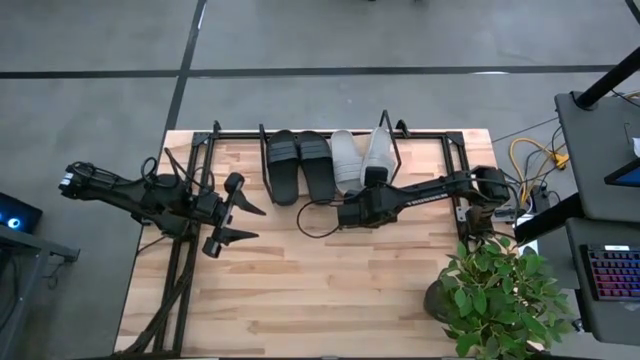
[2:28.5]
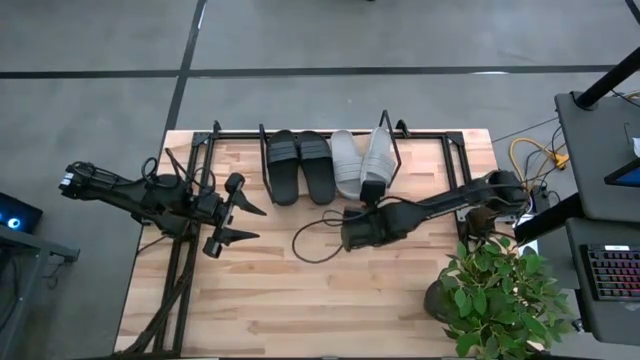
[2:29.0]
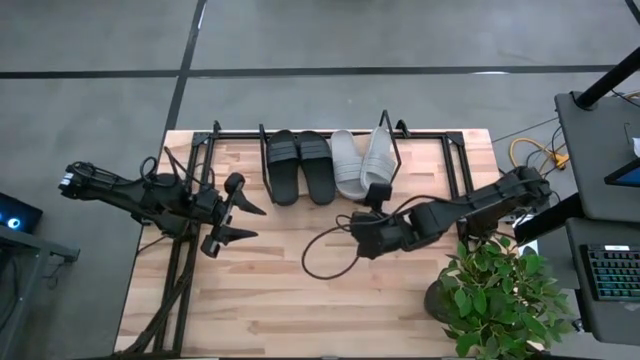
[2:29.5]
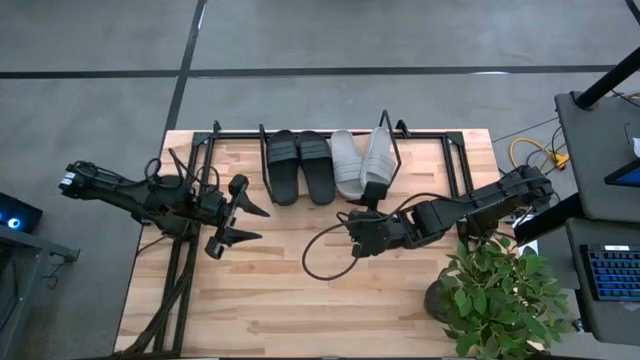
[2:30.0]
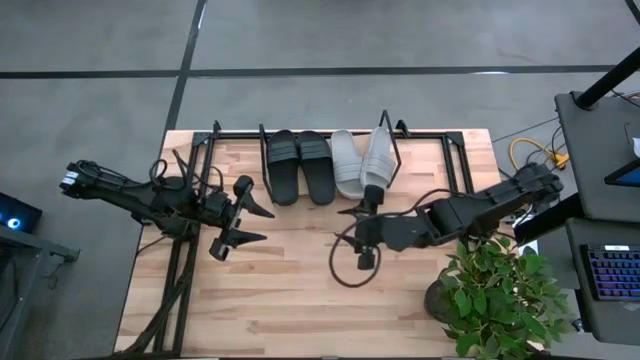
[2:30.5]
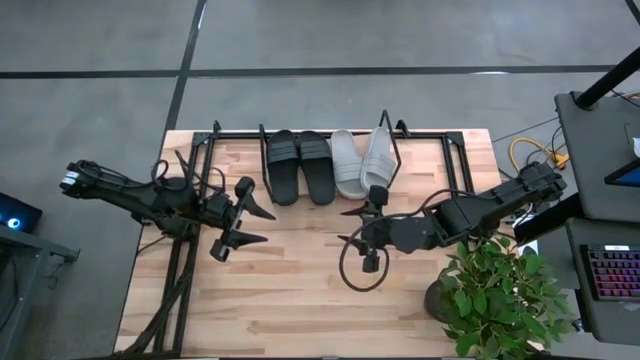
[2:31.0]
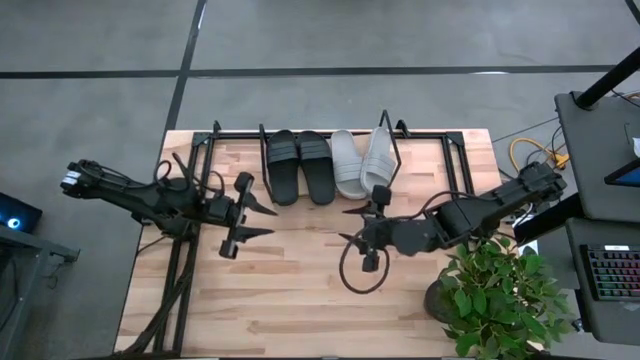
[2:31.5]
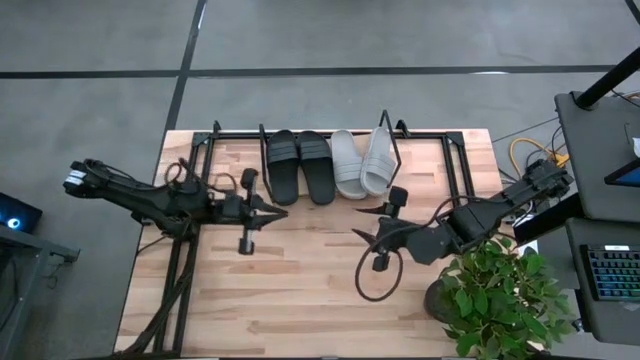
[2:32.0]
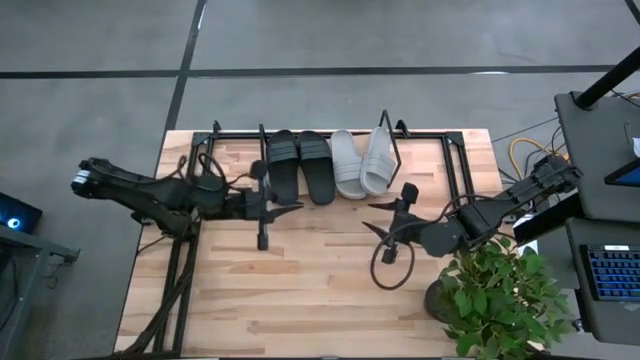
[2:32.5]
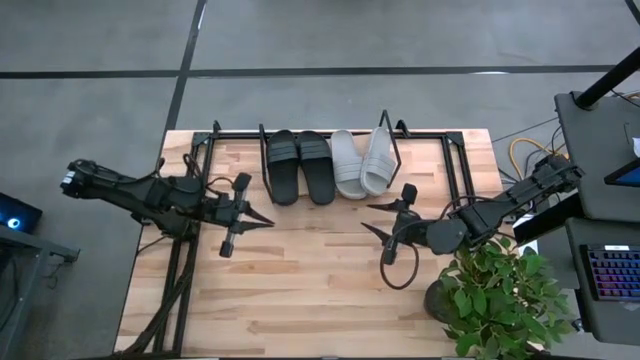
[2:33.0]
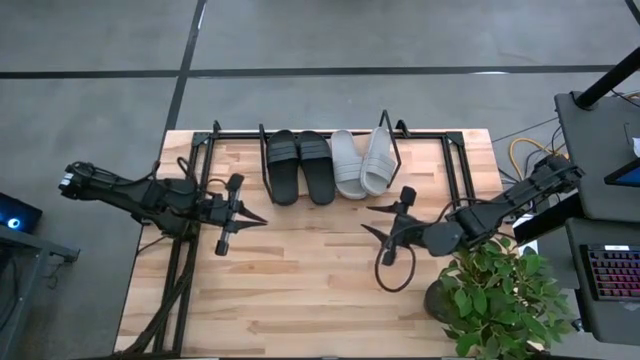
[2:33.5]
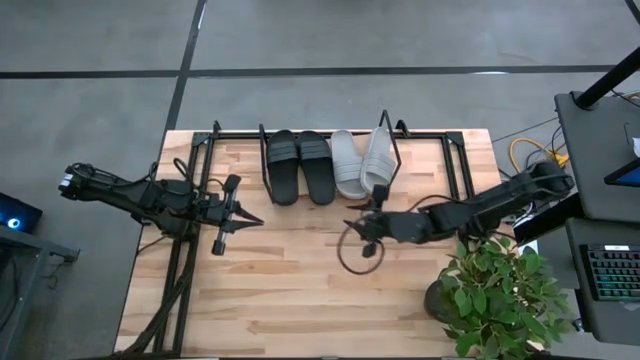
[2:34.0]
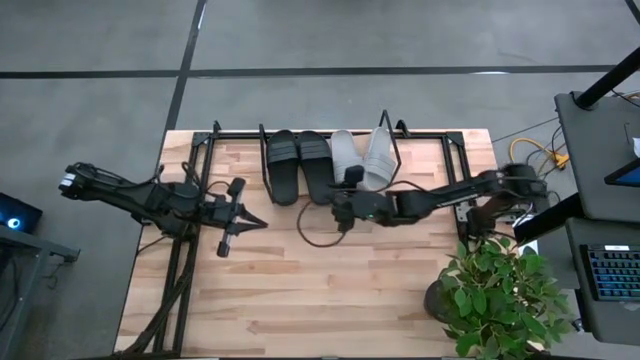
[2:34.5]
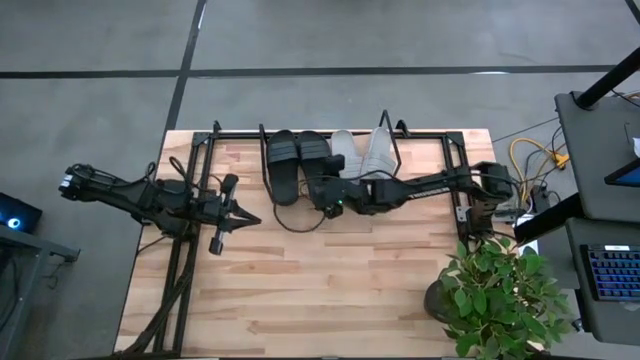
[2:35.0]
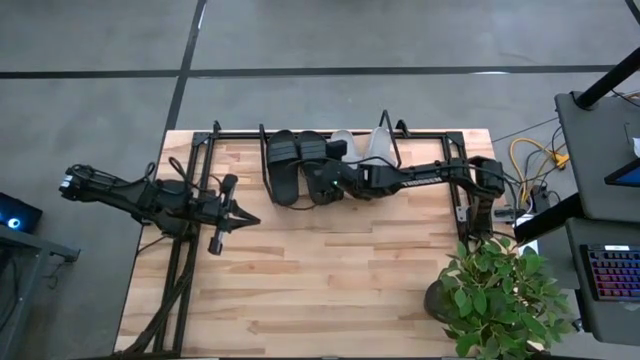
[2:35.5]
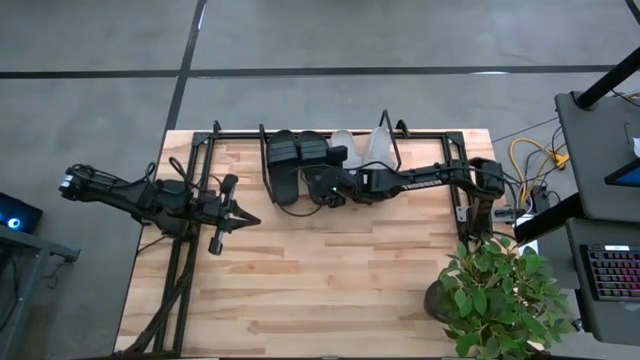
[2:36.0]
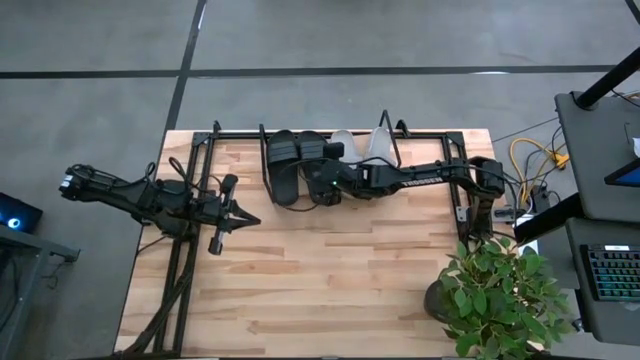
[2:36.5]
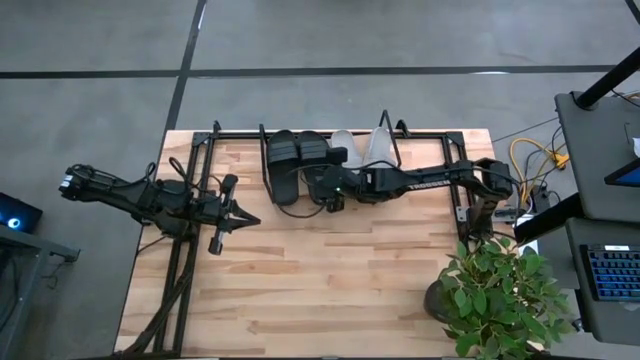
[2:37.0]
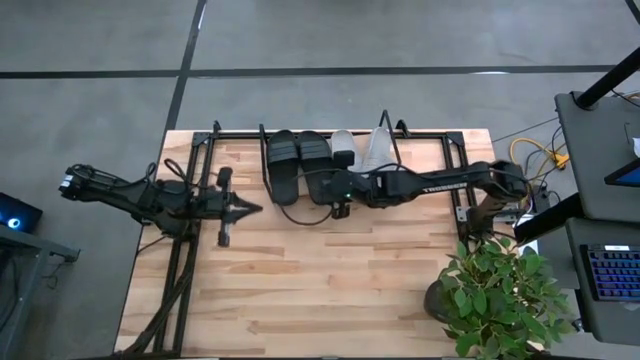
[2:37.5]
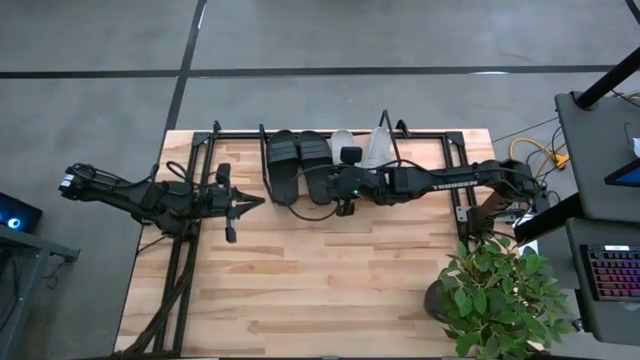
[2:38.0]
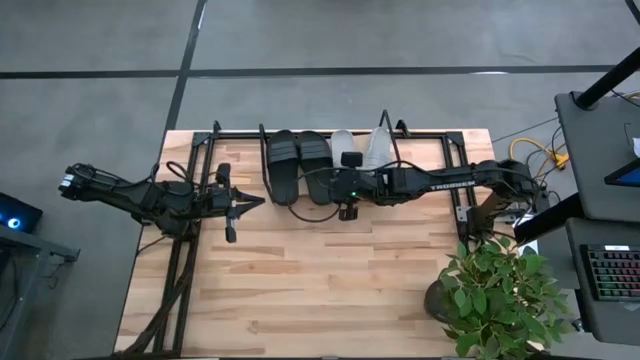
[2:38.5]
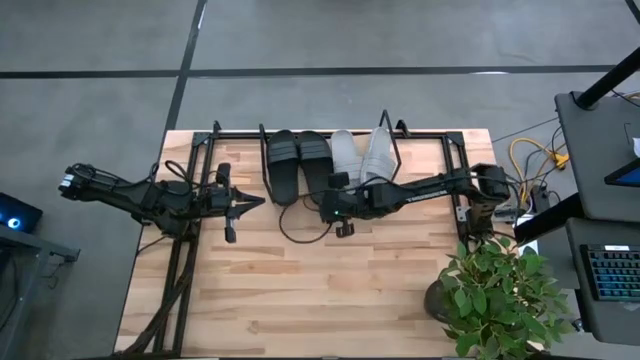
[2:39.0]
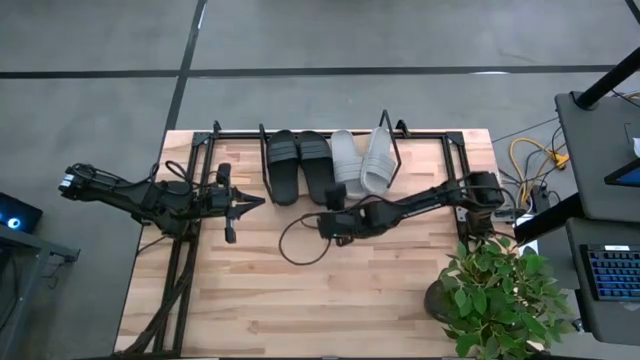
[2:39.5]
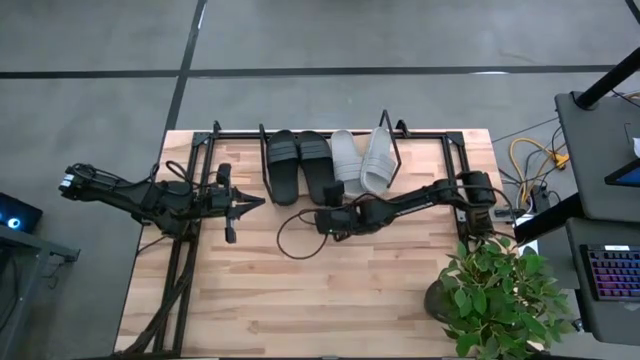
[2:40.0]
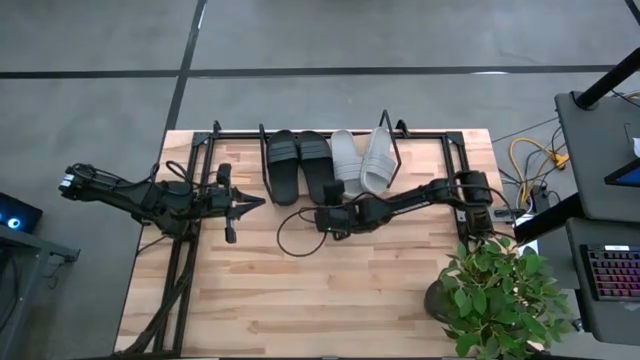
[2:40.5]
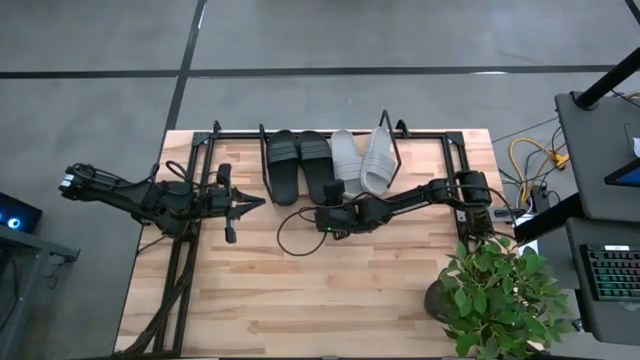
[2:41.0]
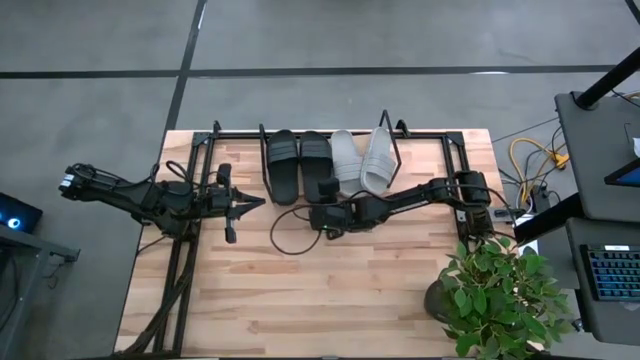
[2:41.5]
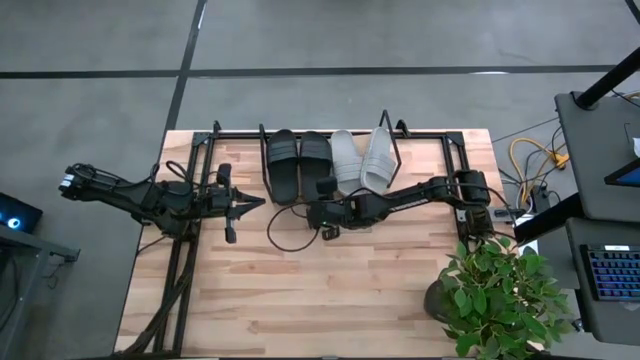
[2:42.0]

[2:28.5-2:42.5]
Task: Pick and place slides into the shelf
Adjust the black slide from the shelf

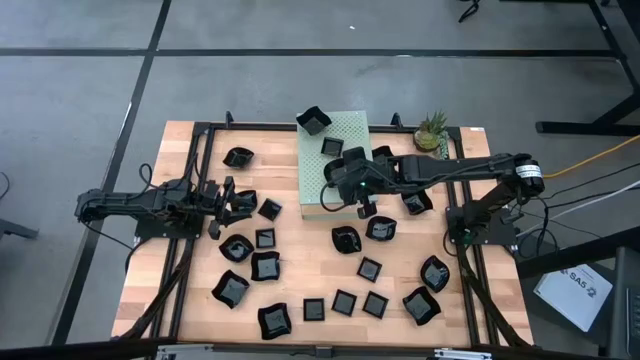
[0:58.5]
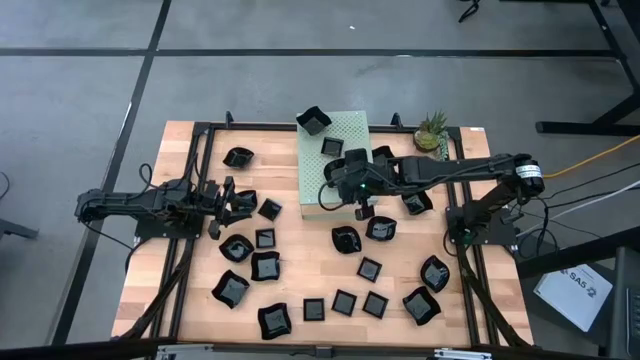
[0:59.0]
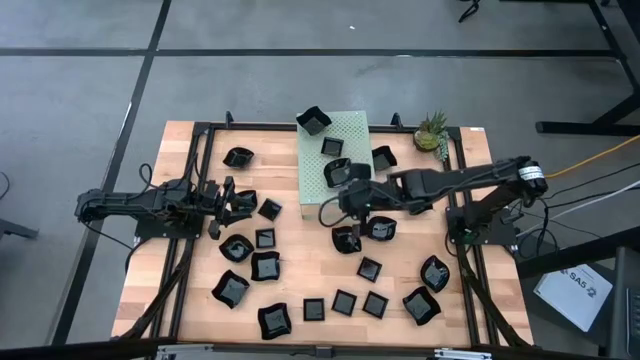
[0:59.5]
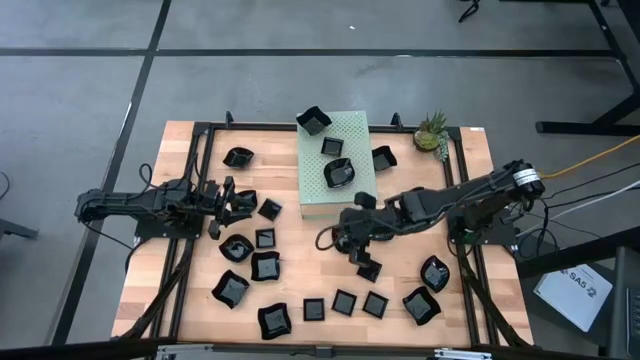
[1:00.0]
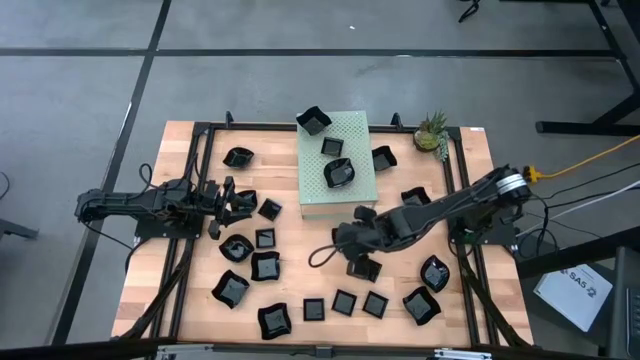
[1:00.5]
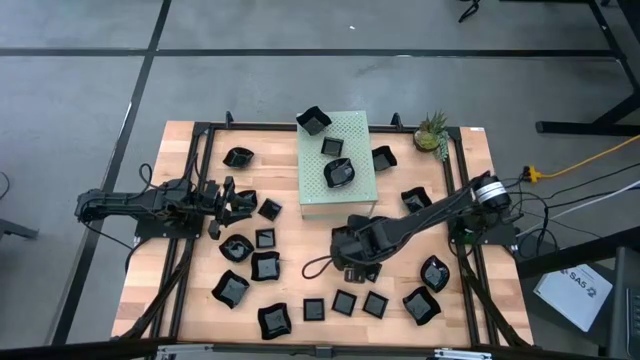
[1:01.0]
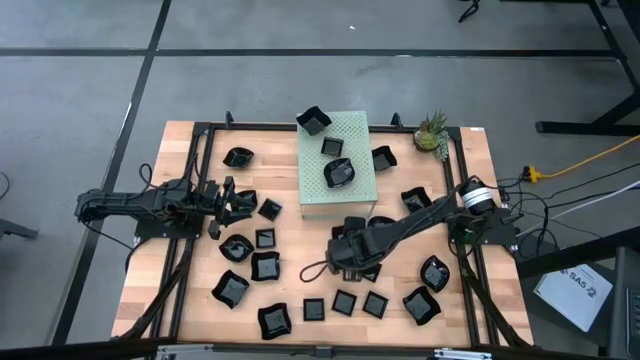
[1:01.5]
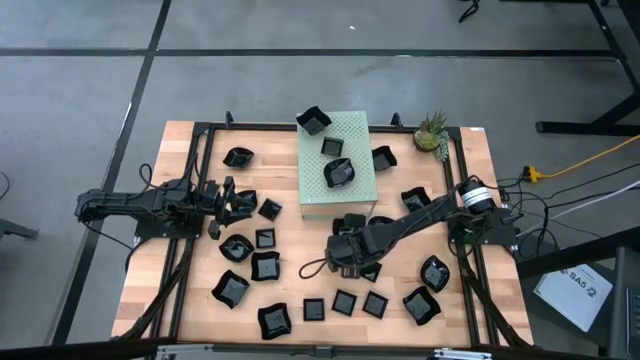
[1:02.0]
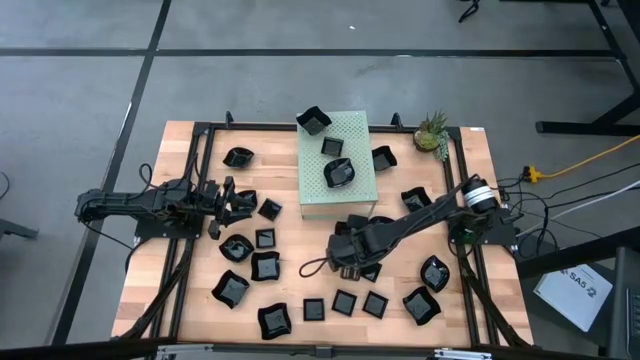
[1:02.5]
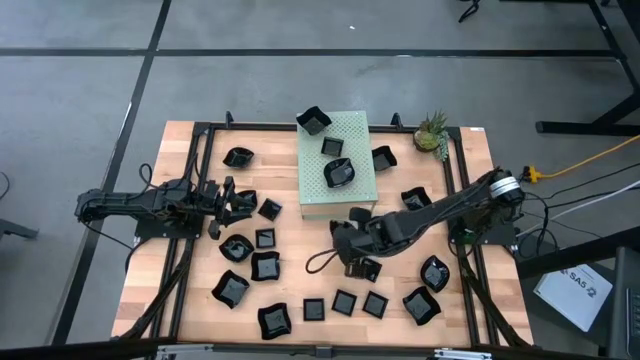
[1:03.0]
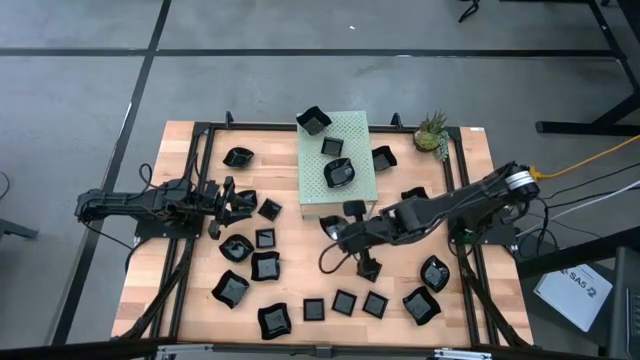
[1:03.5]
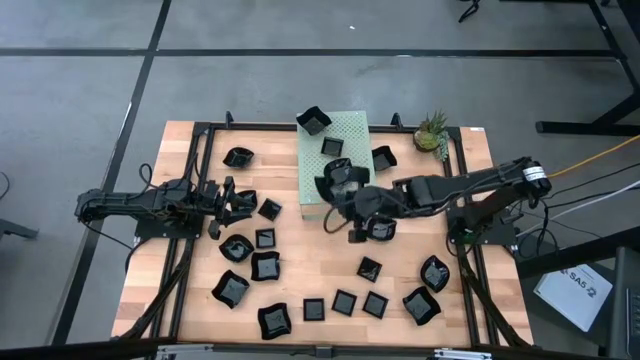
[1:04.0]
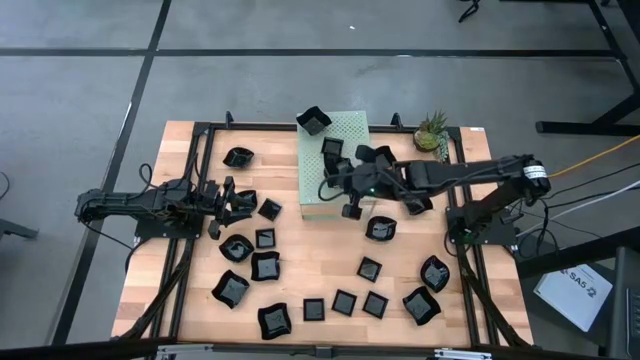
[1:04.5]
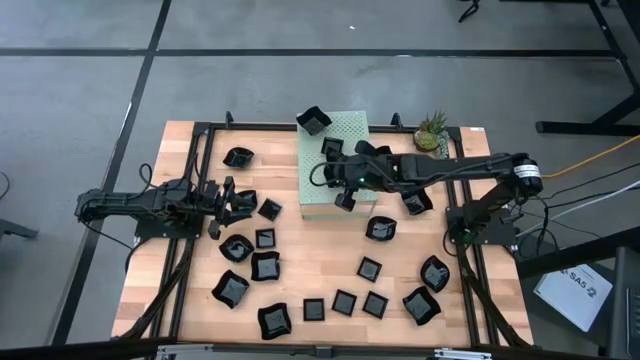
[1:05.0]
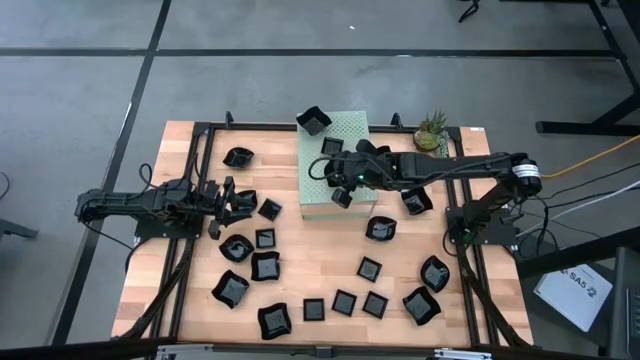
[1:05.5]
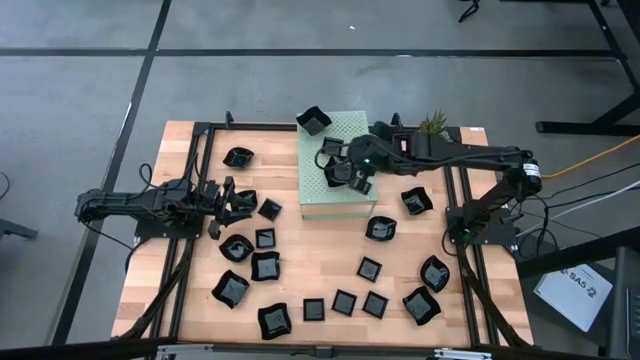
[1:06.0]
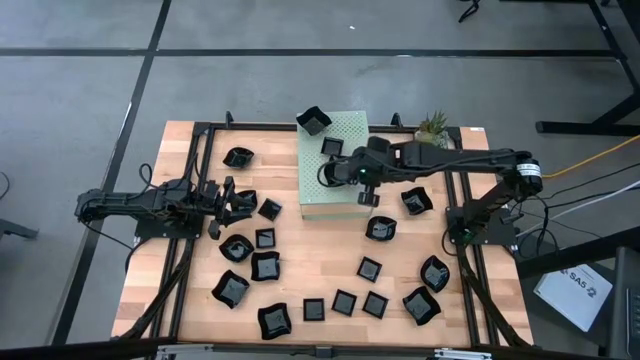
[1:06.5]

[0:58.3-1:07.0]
Task: Pick & Place Mini shaped plates
Stack the black leaf shaped plate on top of the black leaf shape plates on the shelf
